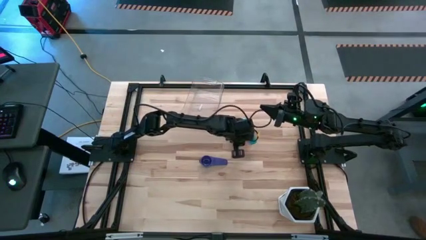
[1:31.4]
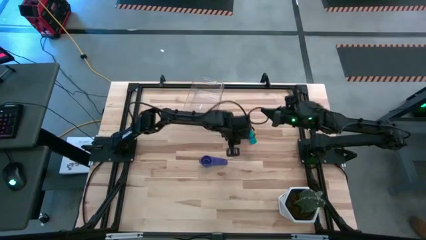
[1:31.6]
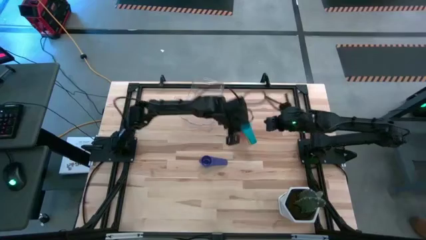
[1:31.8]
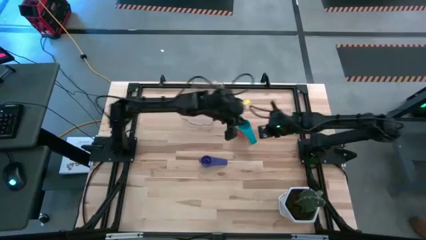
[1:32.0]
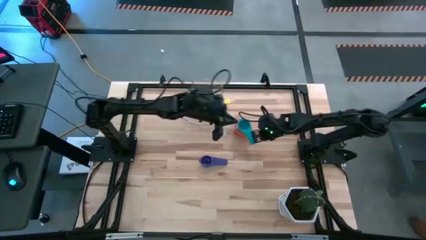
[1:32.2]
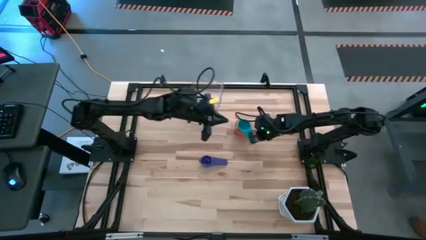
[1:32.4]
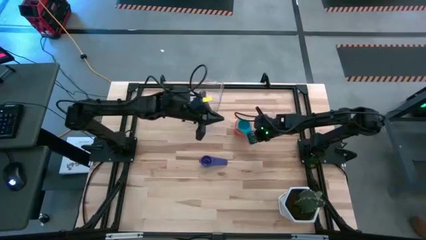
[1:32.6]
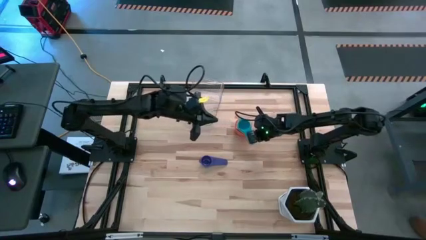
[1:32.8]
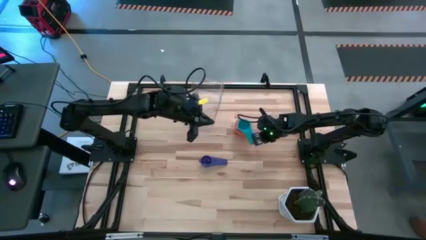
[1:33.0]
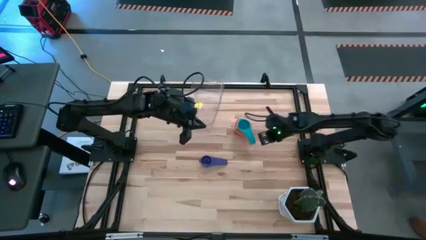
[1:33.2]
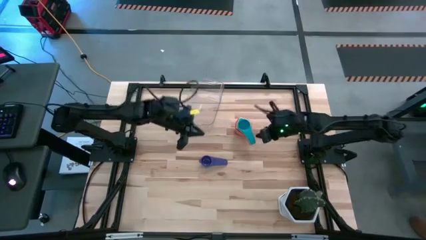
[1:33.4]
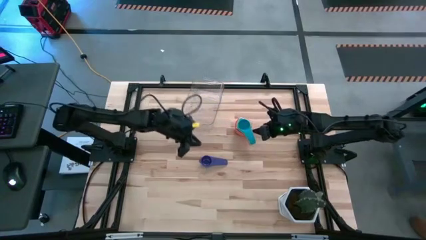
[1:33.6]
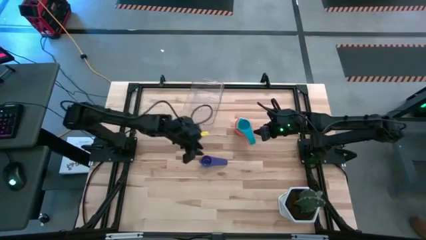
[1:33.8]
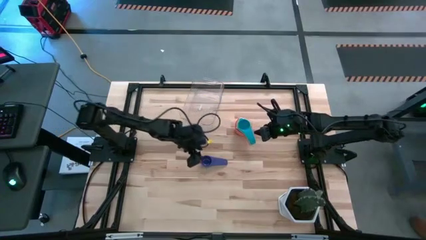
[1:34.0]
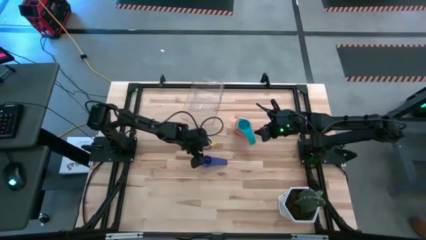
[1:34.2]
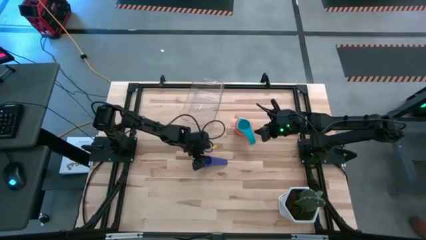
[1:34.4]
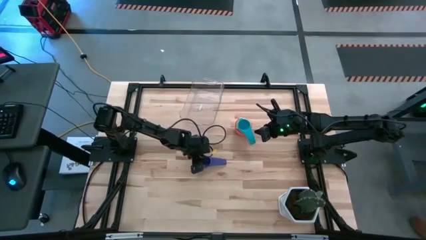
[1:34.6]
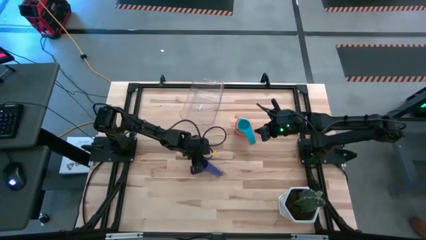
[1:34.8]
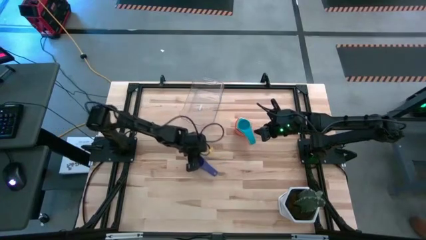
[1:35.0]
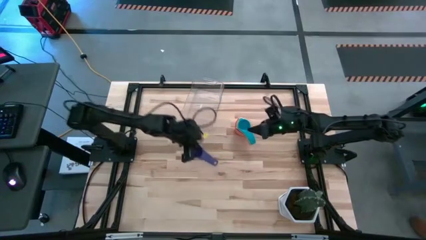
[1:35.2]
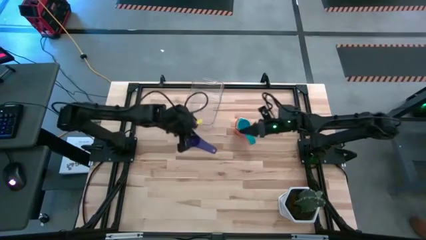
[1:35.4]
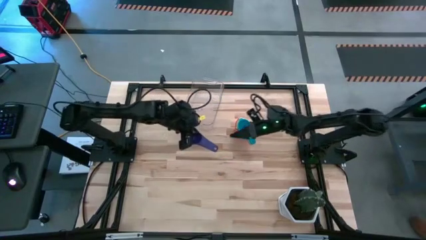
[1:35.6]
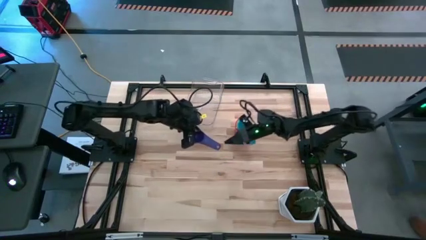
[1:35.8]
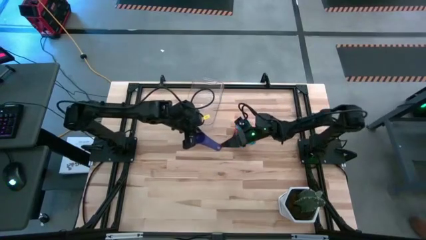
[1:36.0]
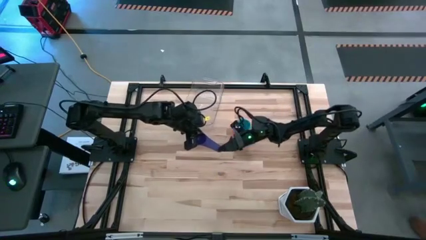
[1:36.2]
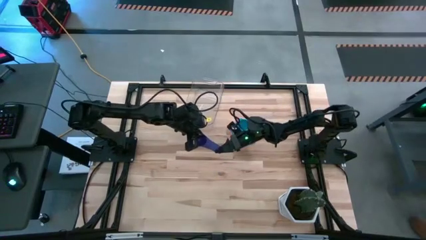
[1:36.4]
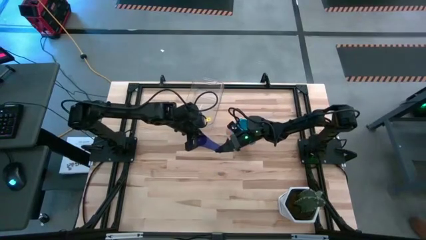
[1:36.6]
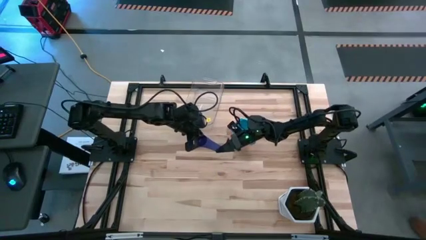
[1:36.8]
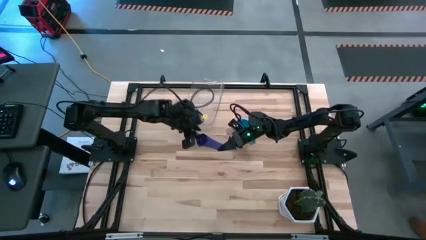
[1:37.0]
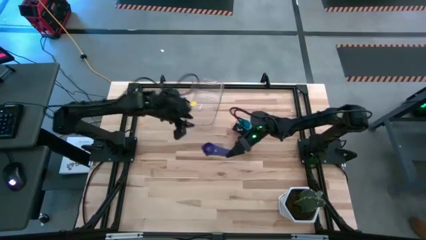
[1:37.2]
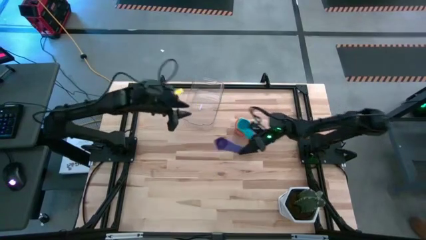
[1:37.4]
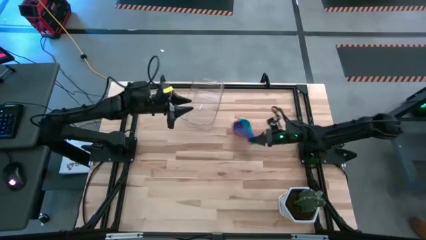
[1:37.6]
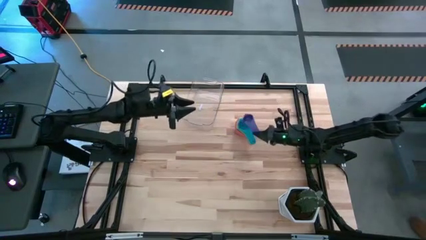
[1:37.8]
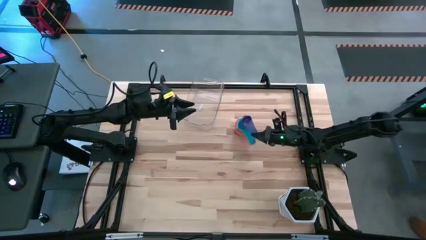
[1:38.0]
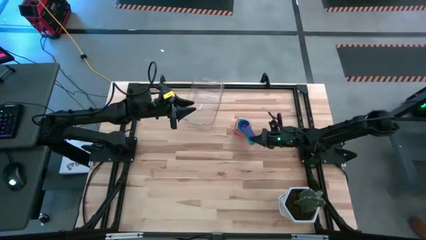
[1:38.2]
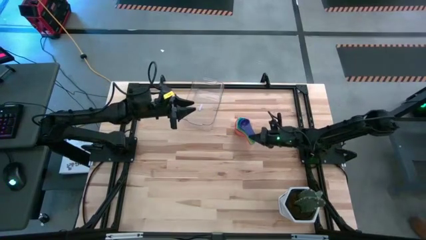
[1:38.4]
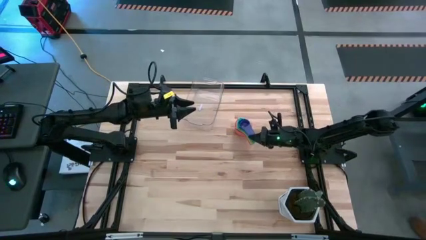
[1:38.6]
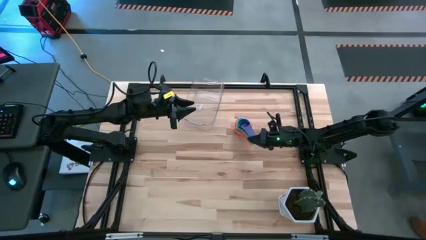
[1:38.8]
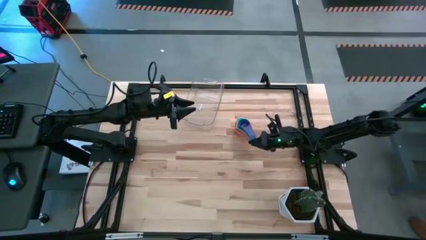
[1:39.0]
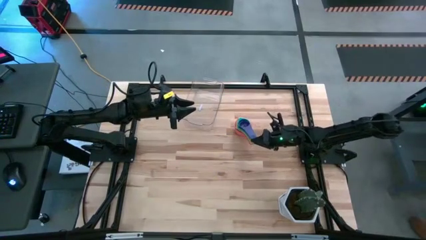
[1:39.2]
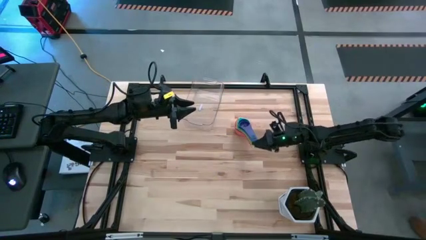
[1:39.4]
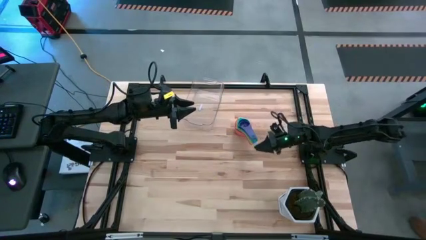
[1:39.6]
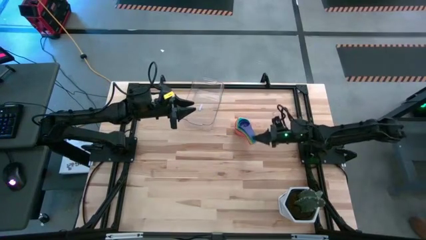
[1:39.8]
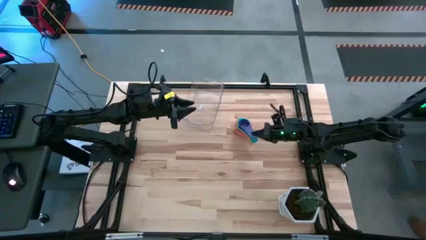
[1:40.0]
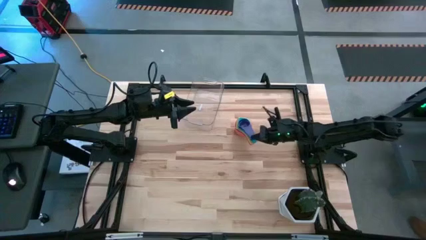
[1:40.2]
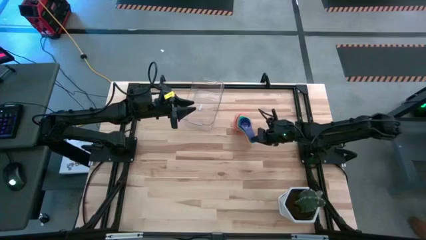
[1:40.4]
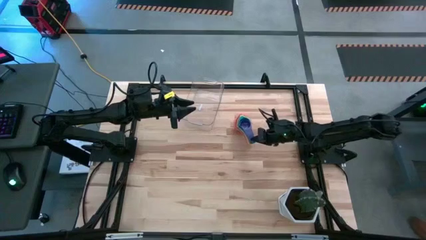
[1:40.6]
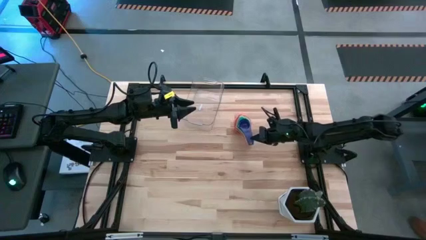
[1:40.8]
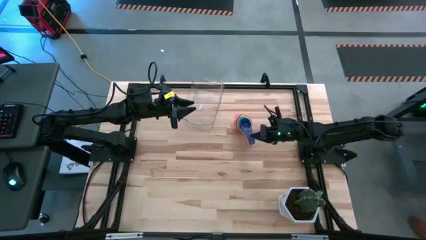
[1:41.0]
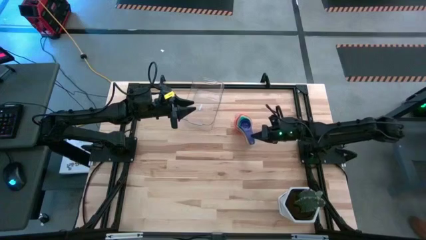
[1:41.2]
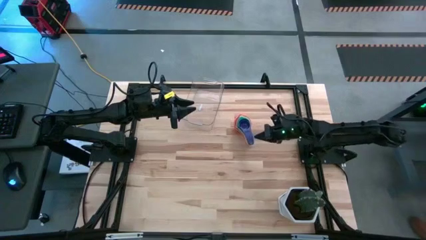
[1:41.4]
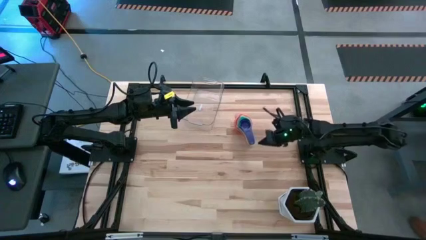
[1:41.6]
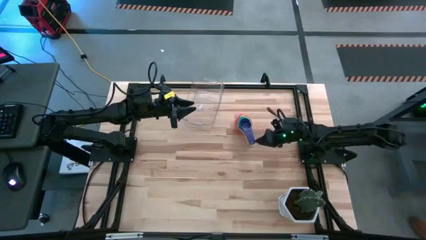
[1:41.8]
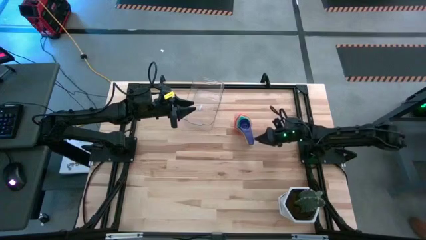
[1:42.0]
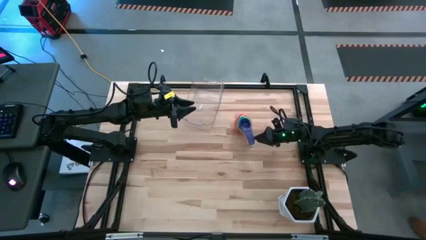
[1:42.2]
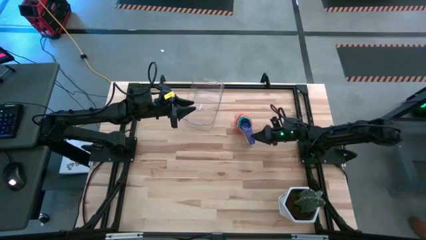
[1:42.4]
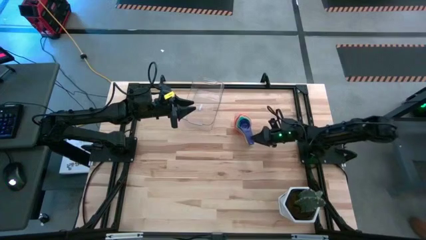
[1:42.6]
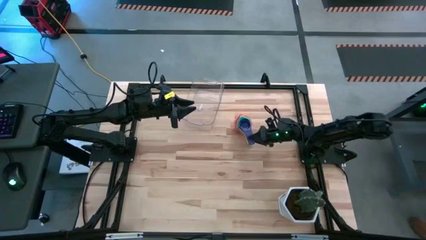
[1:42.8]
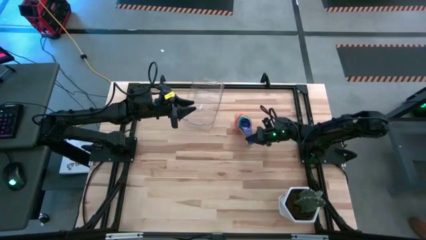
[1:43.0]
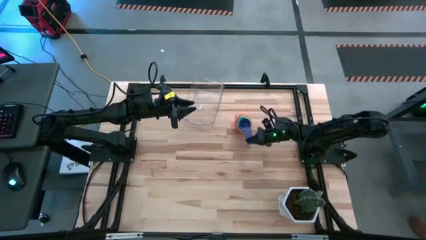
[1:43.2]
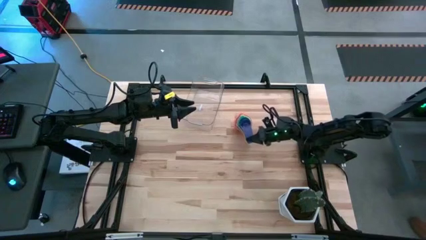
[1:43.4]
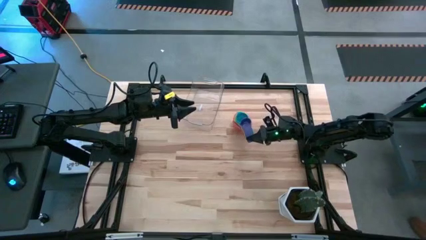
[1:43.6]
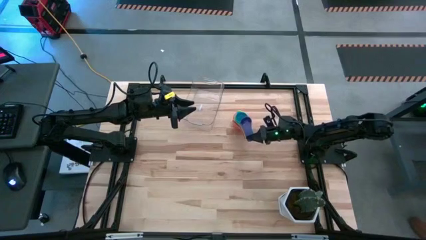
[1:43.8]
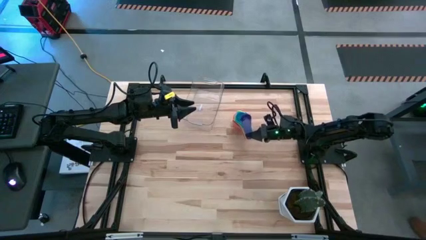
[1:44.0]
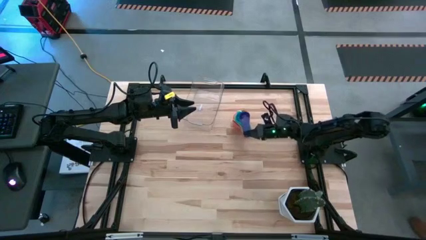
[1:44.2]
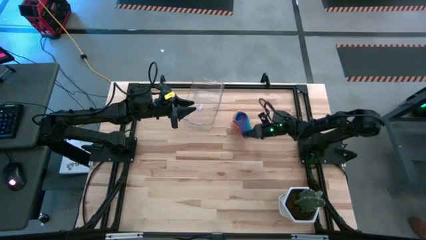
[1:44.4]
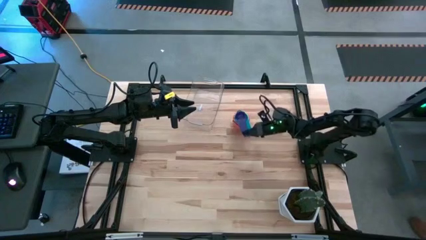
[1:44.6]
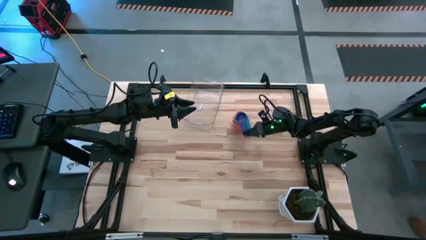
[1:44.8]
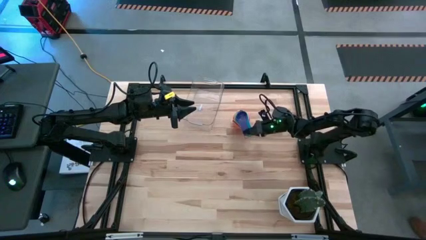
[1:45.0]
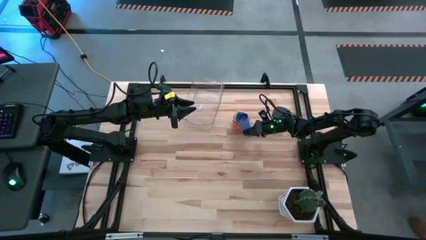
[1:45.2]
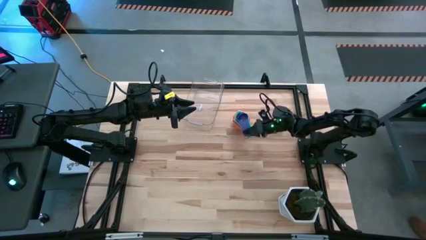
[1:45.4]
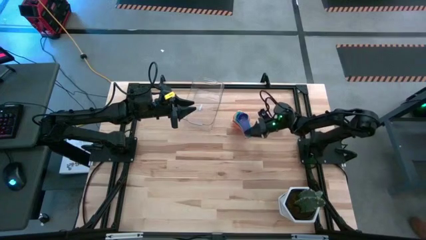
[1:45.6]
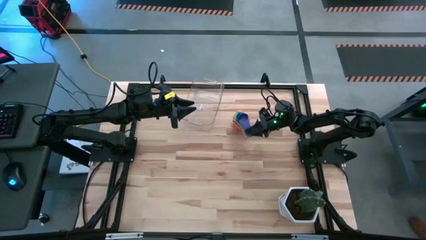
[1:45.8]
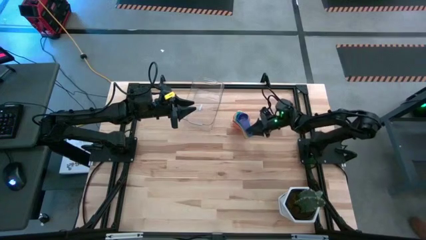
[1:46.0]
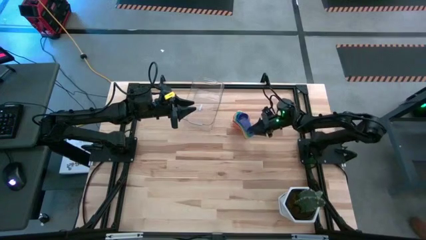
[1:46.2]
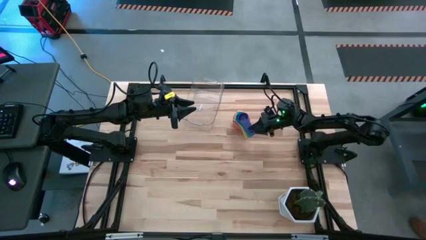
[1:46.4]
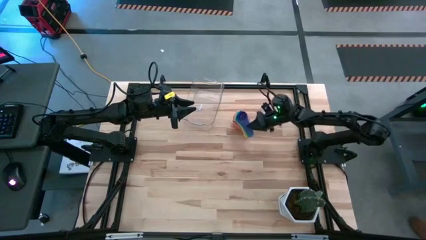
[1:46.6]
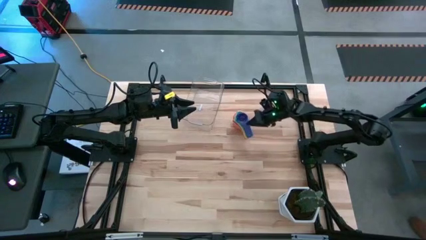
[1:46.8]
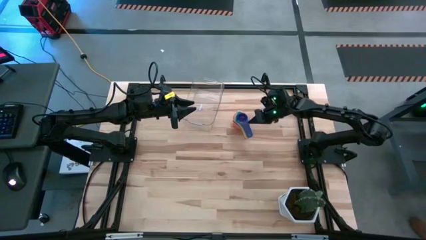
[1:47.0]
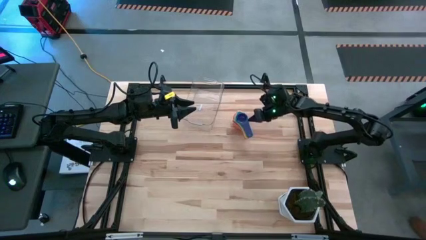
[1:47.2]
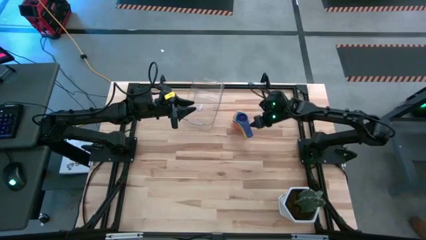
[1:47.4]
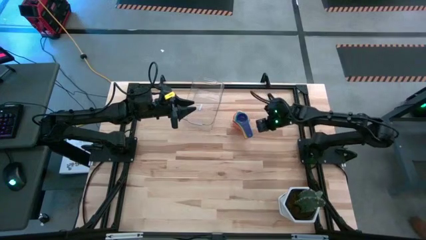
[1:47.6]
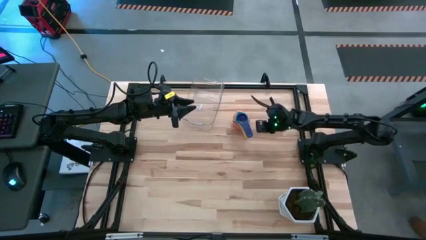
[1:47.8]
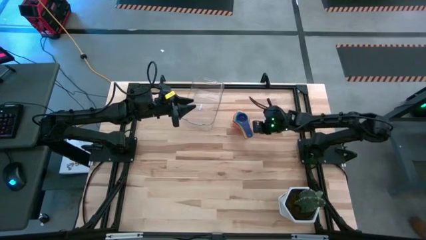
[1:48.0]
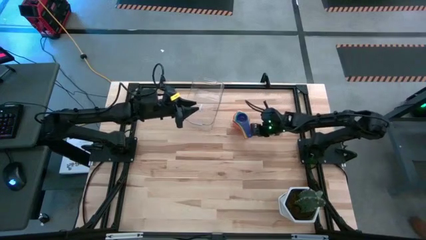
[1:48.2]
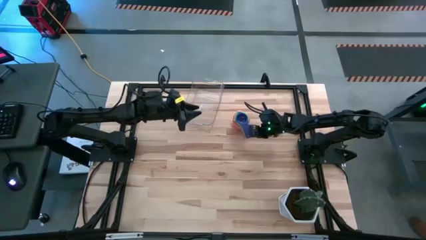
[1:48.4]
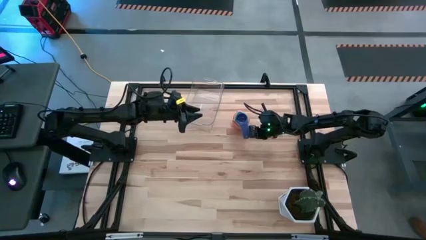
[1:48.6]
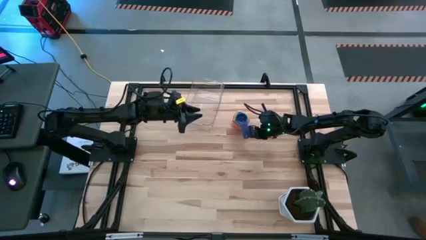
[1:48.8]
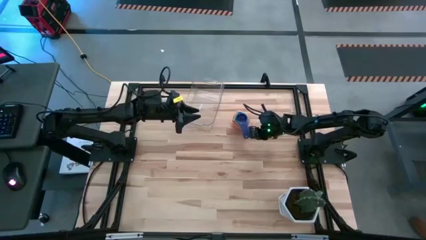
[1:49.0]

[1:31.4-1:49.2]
Task: Nest measuring cups in basket
Put the purple measuring cup on top of the light blue measuring cup
